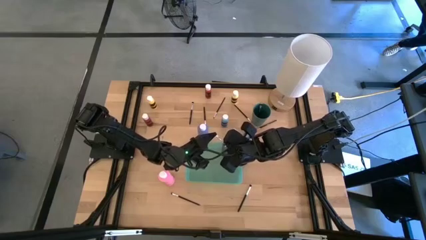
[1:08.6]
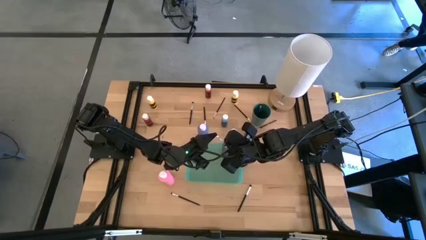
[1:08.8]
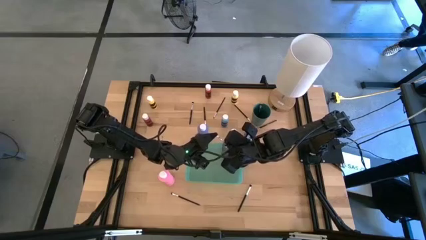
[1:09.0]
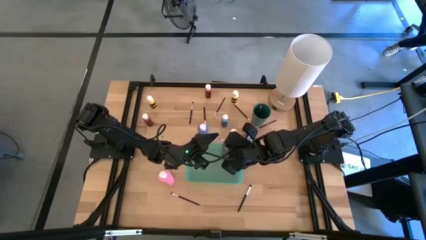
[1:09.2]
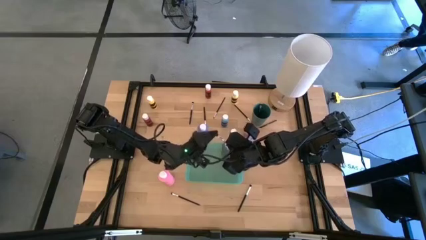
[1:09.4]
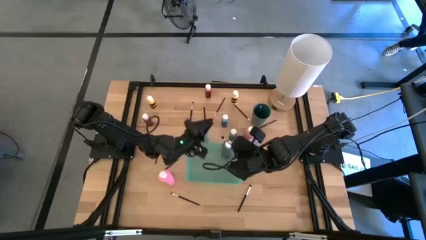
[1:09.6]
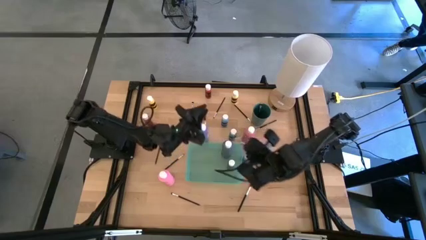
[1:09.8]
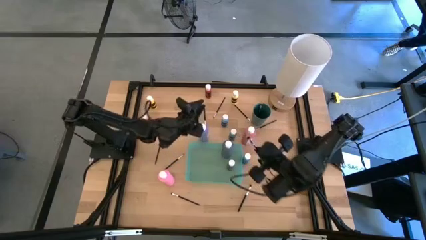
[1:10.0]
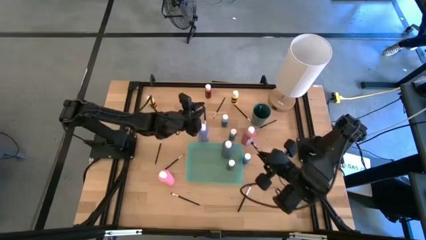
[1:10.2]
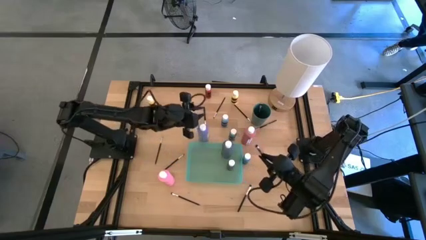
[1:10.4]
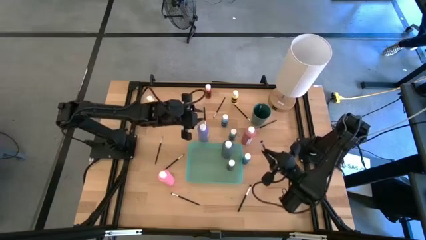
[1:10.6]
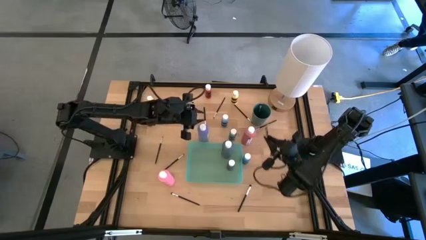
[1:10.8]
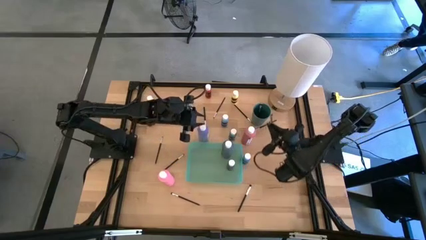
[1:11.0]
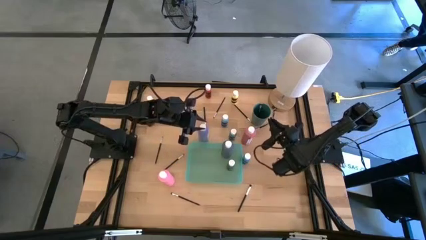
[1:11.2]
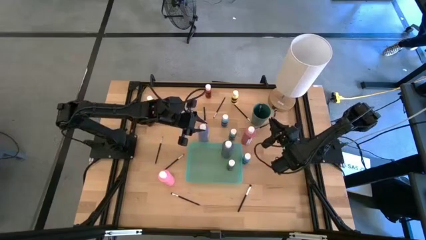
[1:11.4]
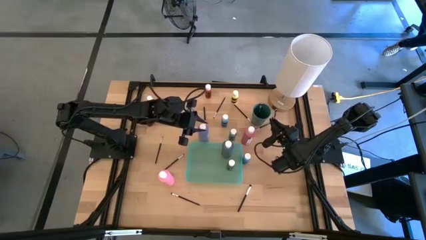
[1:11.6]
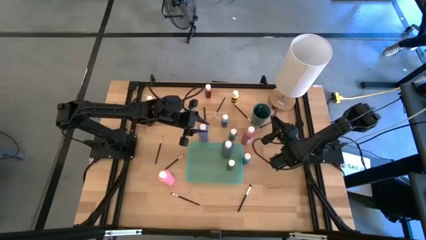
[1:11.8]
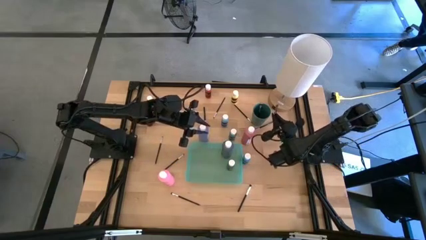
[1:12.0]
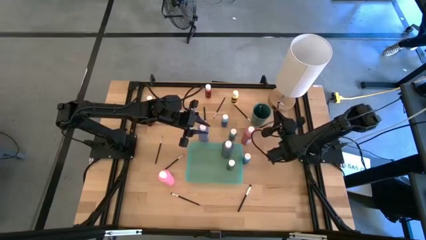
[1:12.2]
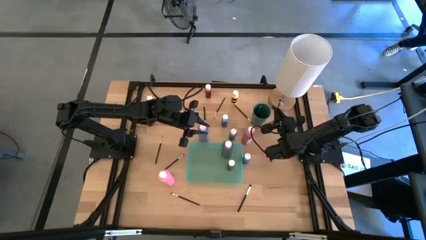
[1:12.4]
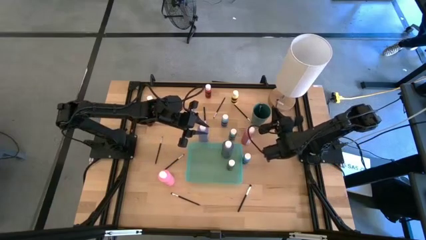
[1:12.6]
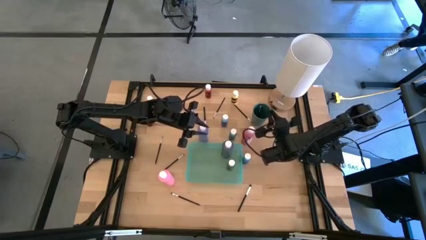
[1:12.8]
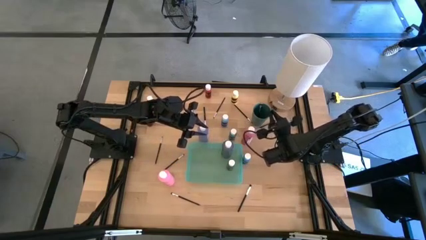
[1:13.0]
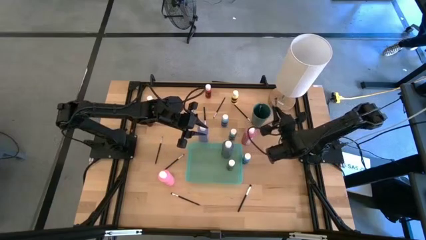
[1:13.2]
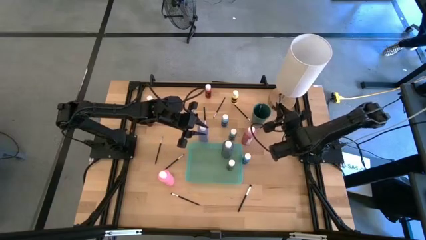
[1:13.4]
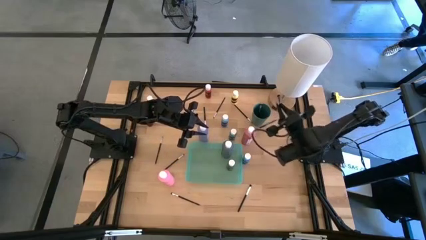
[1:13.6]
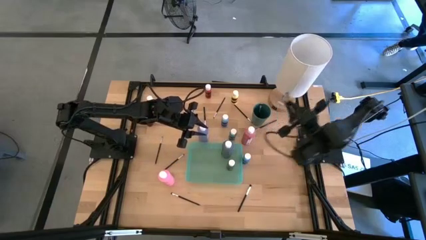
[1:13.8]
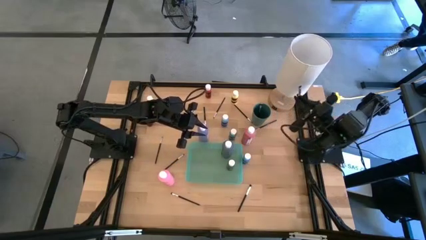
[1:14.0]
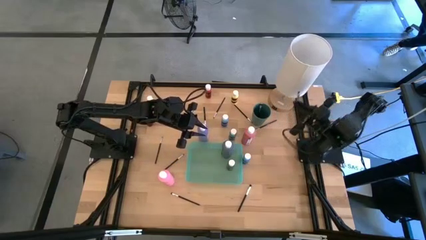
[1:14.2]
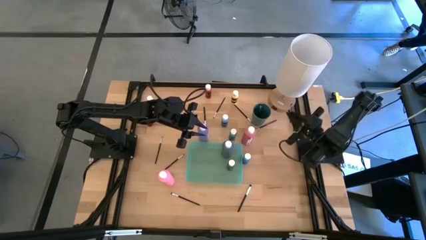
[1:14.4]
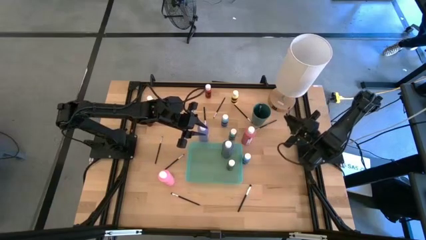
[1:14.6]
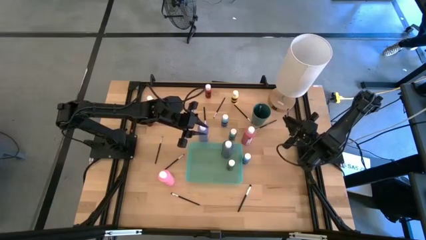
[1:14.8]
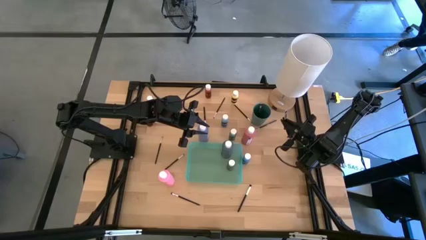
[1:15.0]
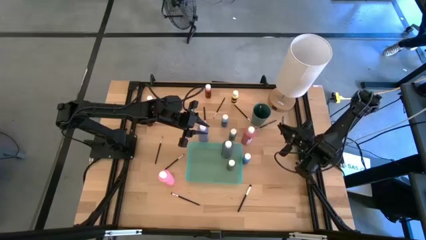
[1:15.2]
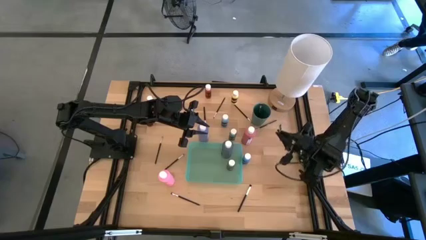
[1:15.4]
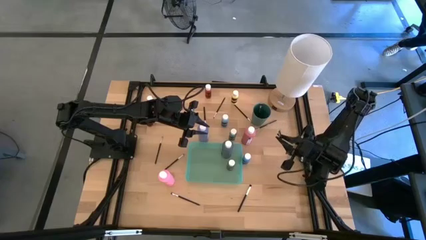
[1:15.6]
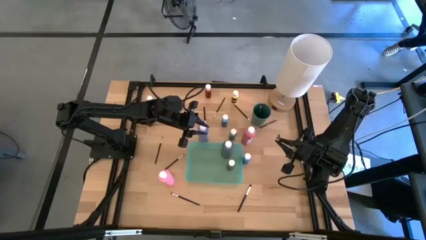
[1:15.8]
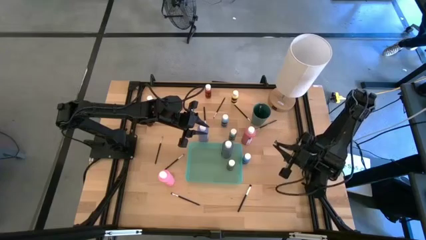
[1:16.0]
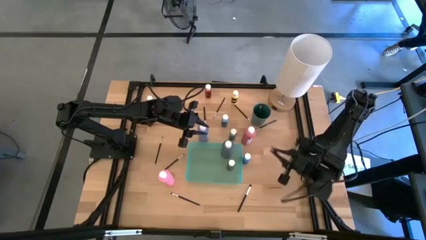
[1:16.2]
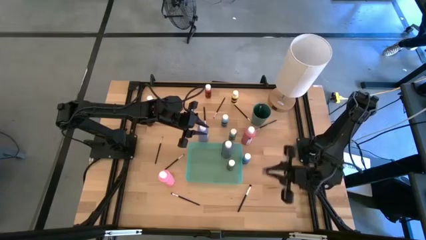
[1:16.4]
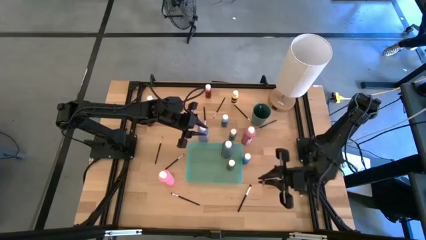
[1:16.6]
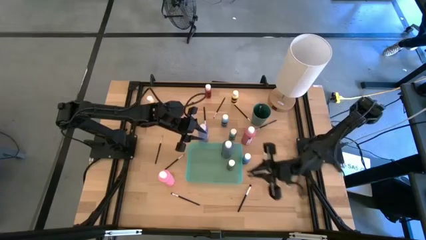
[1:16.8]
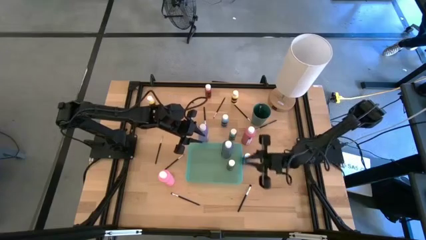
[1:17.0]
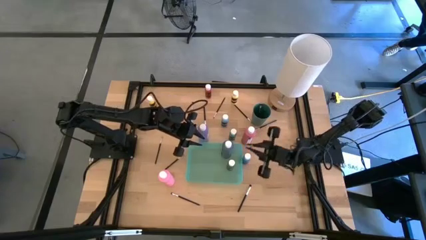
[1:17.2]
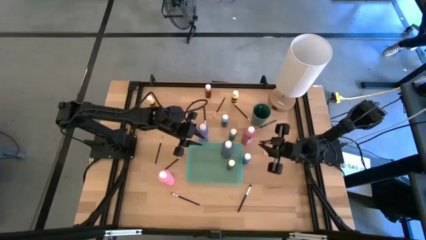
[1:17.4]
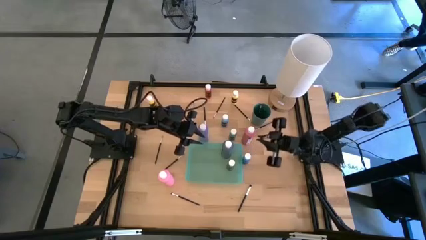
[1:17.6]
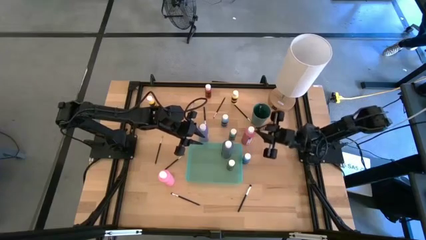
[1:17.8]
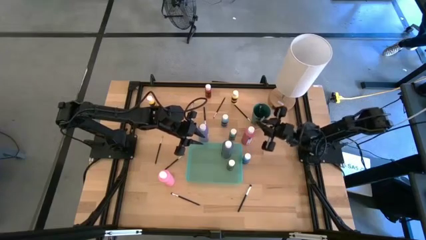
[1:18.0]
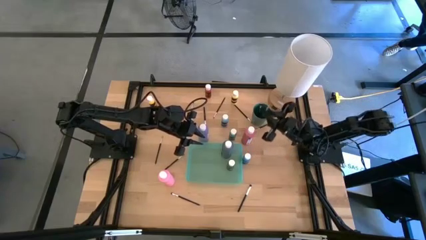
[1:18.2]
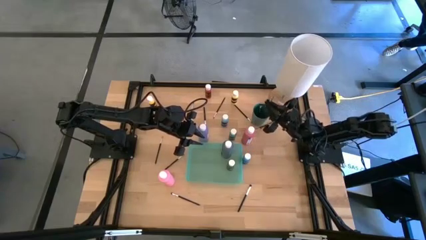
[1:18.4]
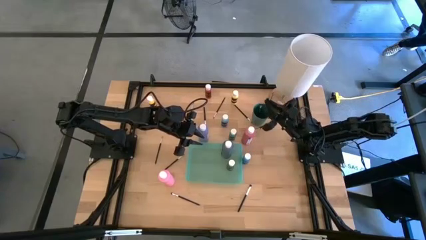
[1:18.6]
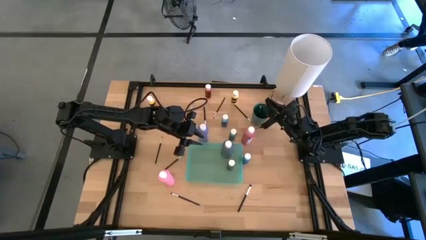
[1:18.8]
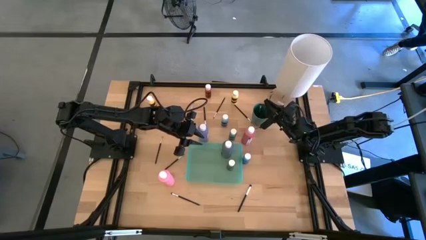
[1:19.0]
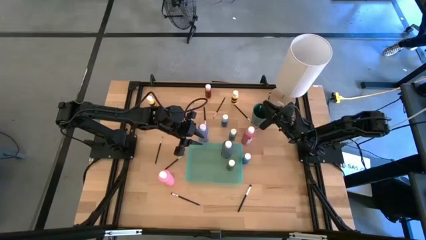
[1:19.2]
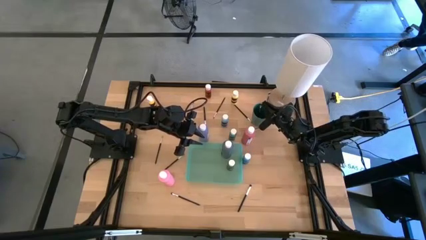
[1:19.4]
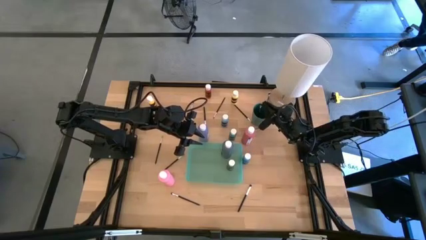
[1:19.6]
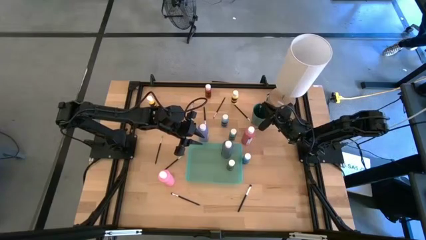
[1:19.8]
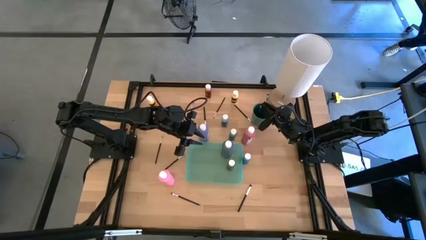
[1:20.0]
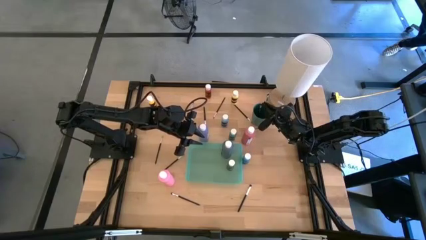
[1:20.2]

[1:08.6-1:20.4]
Task: Pick & Place Paint Supplies
Put the black eyeshadow brush into the green cup
